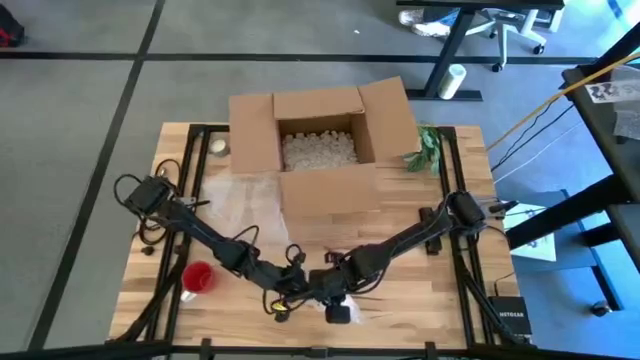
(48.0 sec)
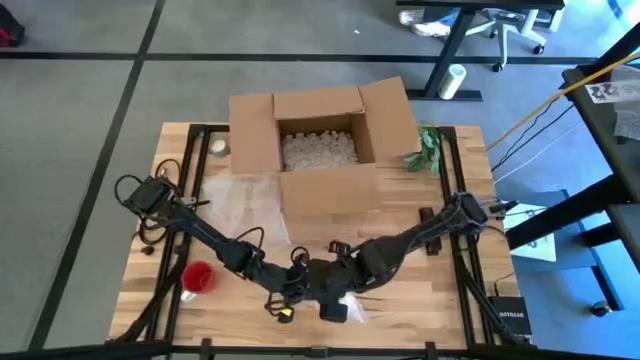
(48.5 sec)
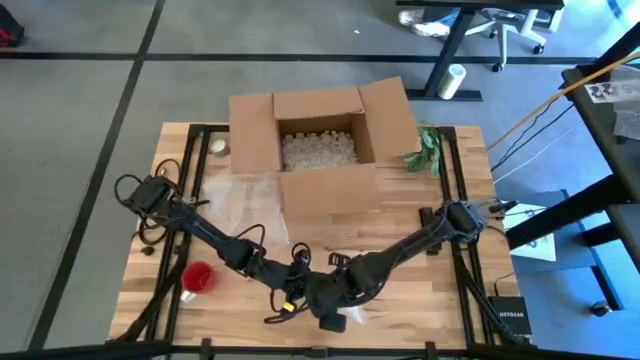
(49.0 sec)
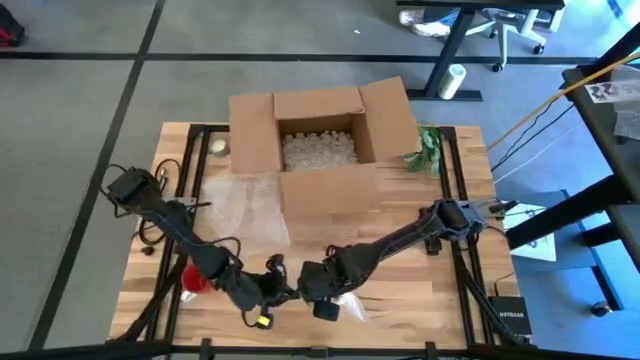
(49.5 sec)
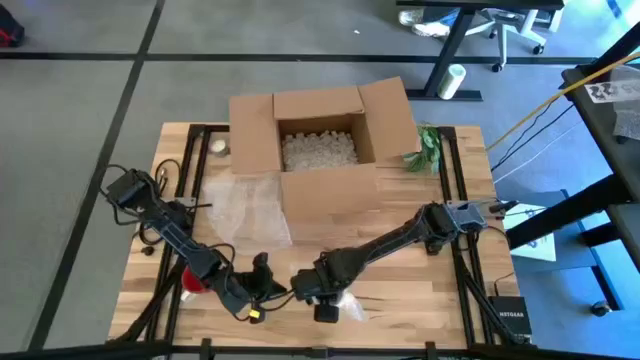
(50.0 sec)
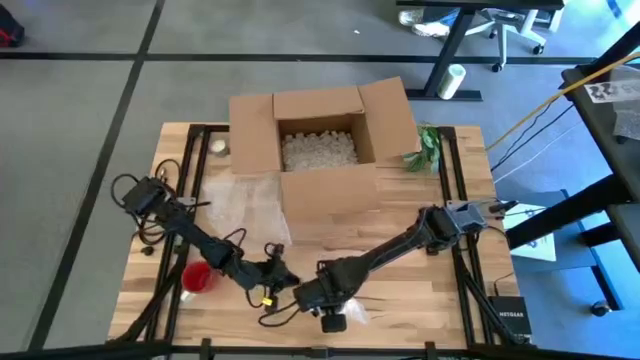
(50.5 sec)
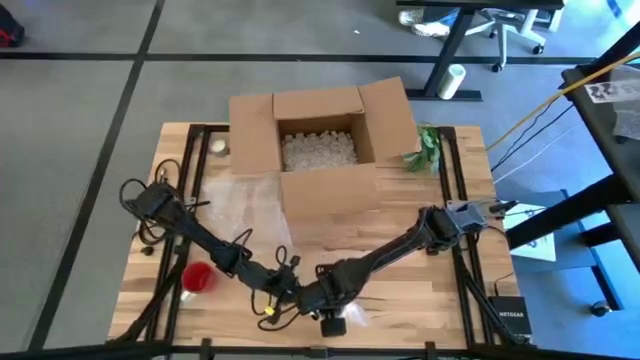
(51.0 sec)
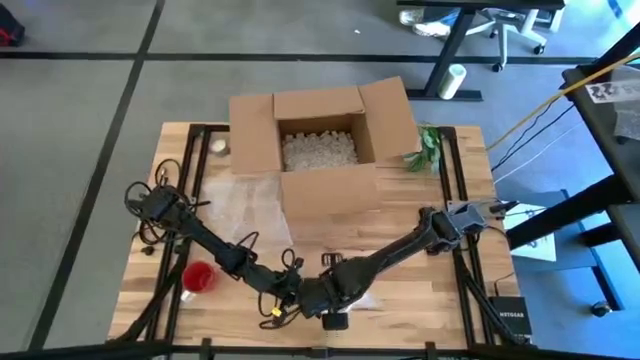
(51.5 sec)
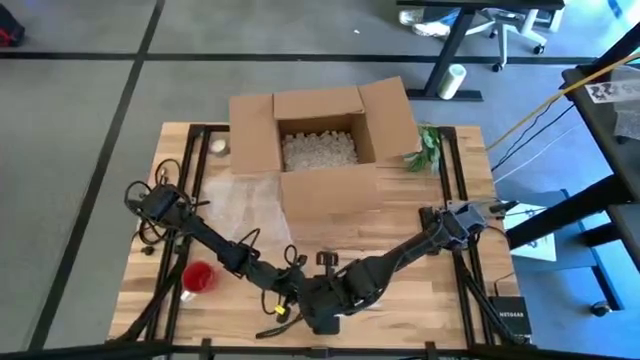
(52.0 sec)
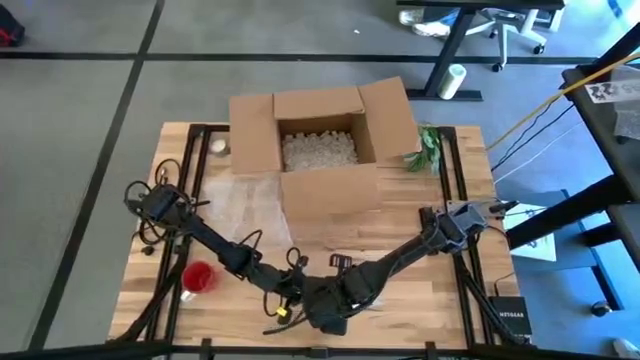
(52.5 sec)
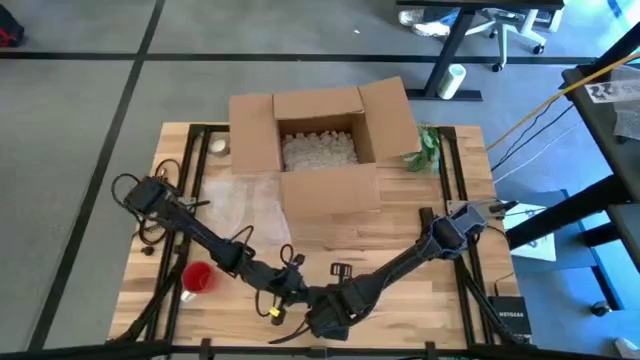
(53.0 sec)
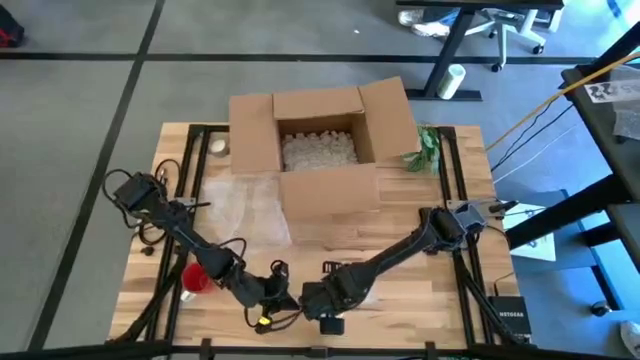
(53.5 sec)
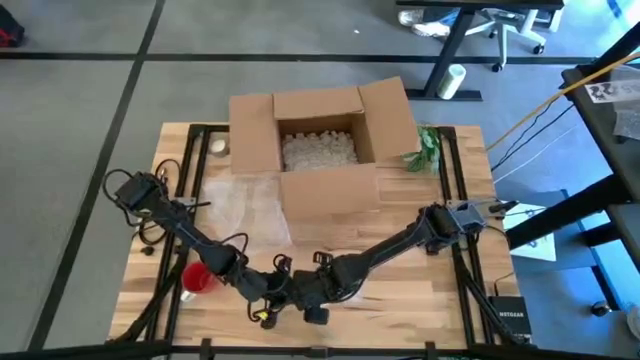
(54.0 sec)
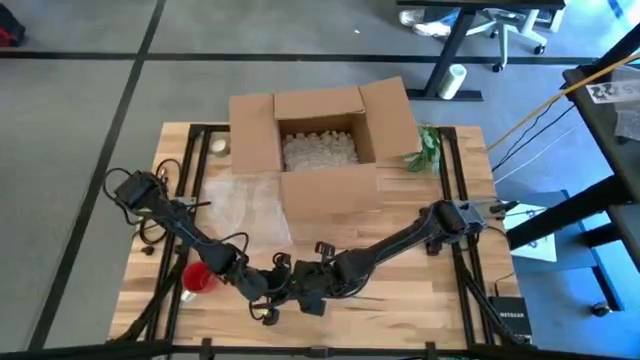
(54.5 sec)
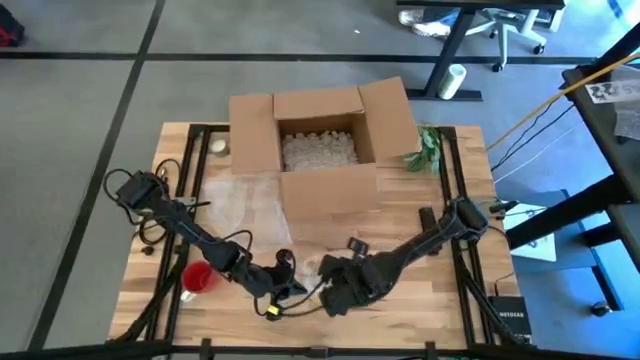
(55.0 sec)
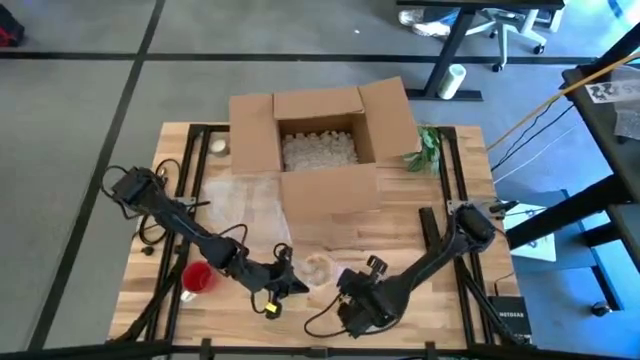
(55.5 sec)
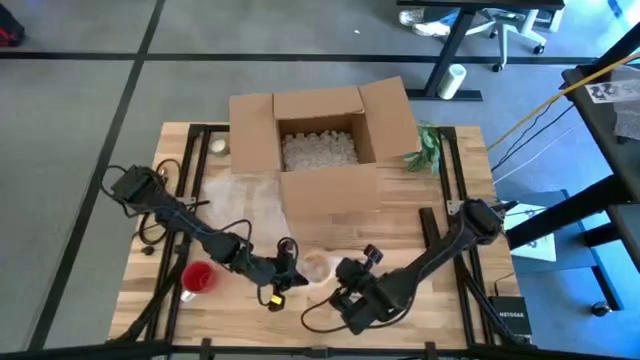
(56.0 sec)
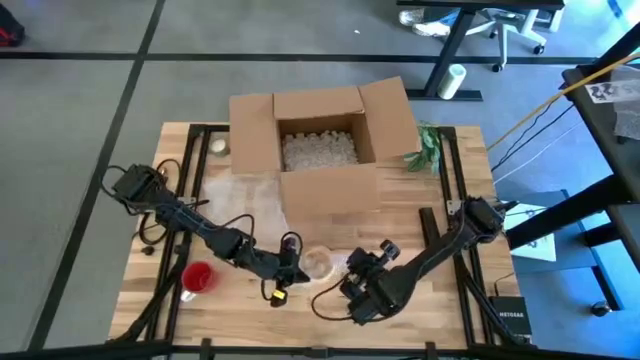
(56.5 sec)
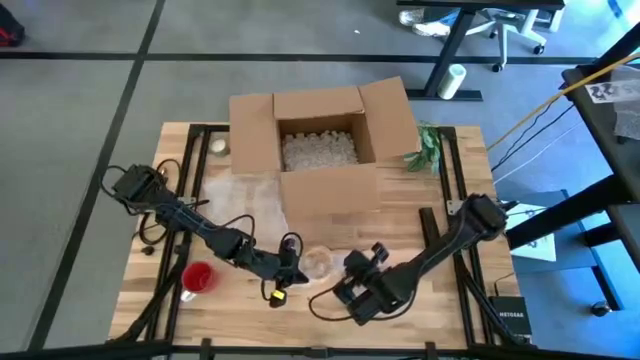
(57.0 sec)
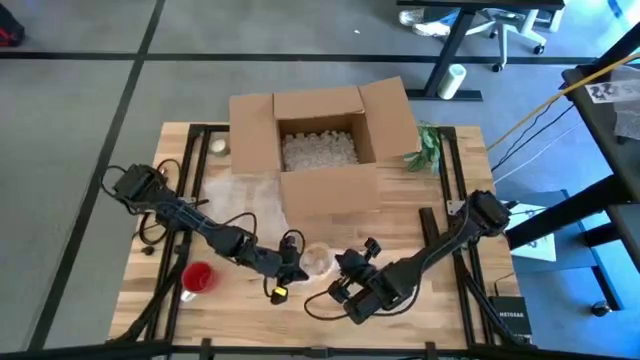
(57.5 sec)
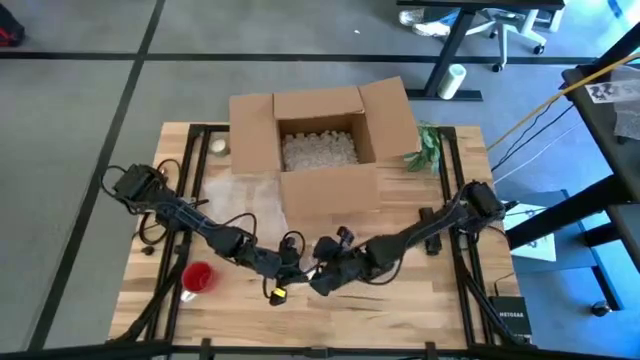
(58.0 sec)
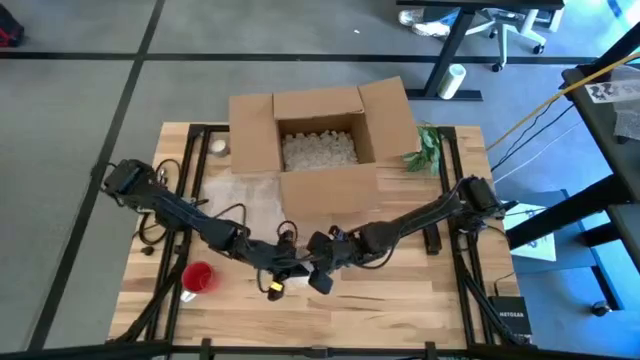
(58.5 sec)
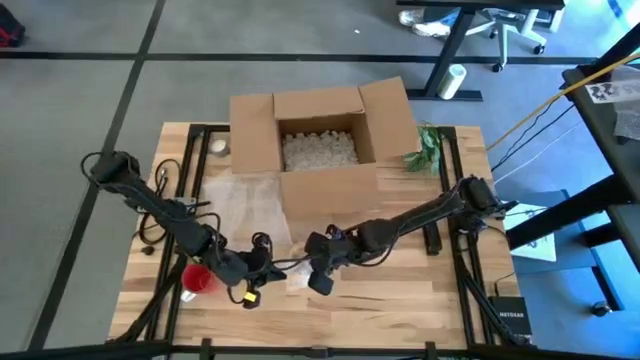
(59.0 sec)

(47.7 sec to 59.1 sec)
Task: wrap mug
Wrap the yellow mug with the right transparent bubble wrap

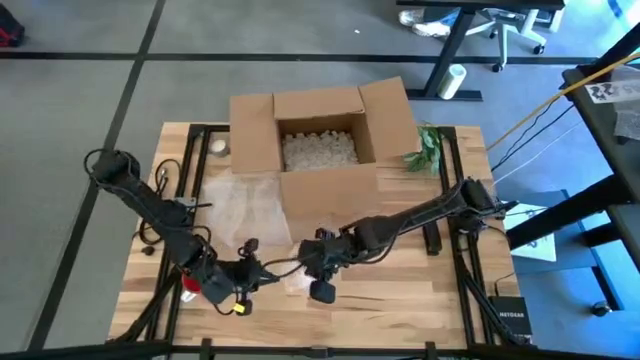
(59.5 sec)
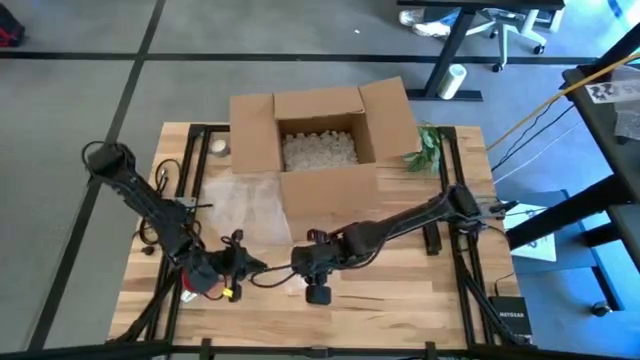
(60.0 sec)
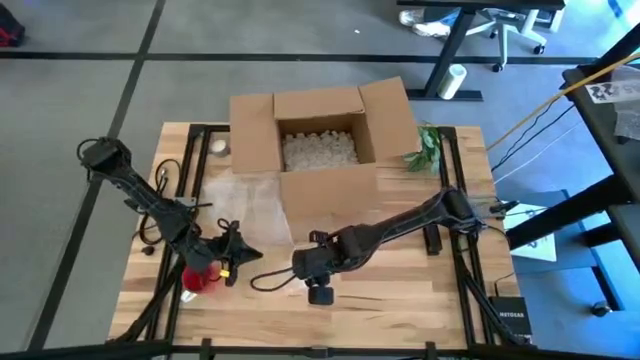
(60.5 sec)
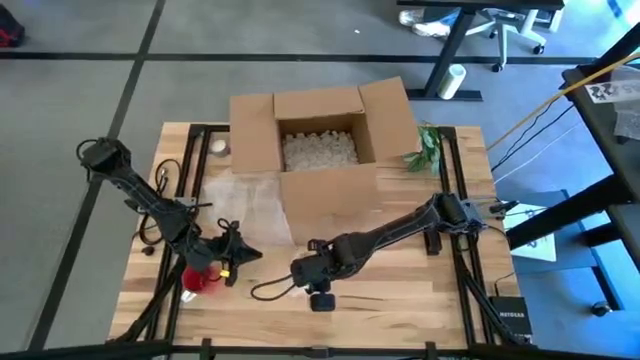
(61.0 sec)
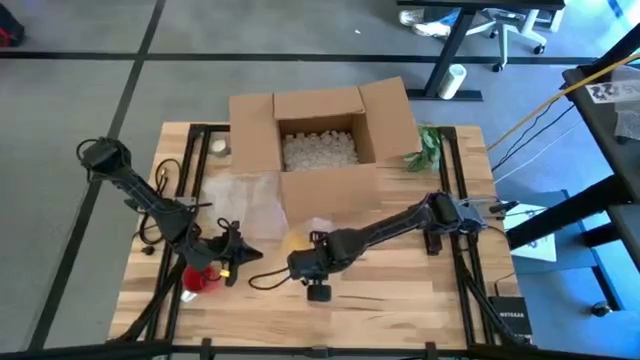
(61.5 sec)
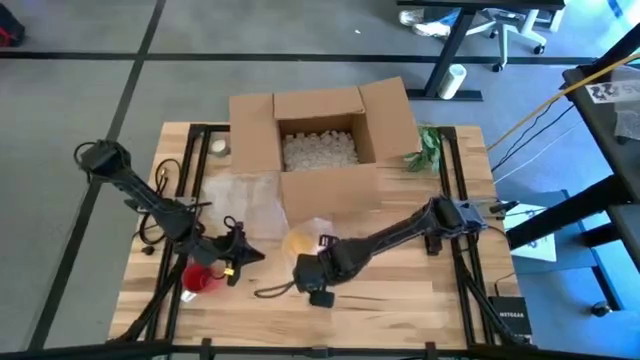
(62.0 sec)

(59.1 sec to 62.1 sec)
Put the wrapped yellow mug into the cardboard box

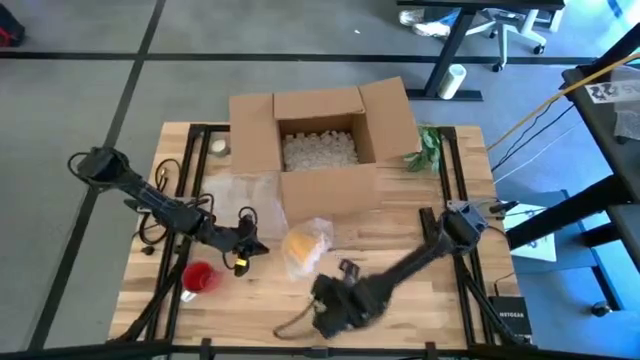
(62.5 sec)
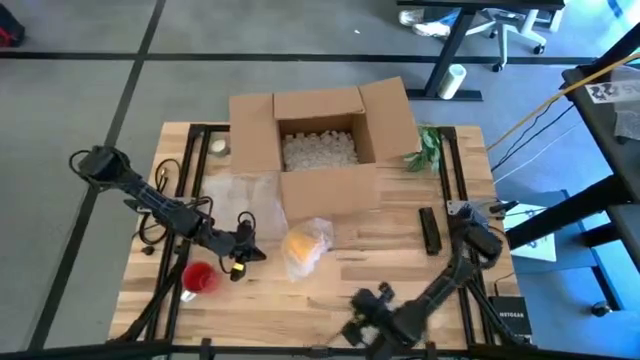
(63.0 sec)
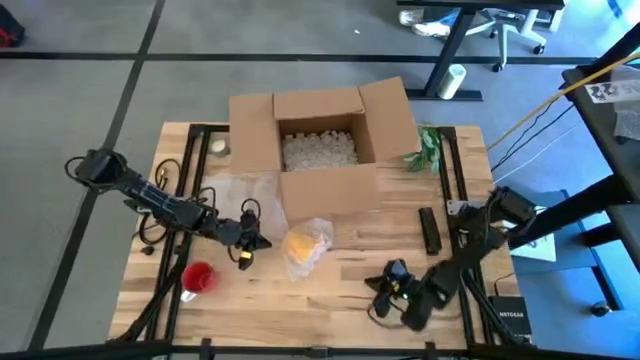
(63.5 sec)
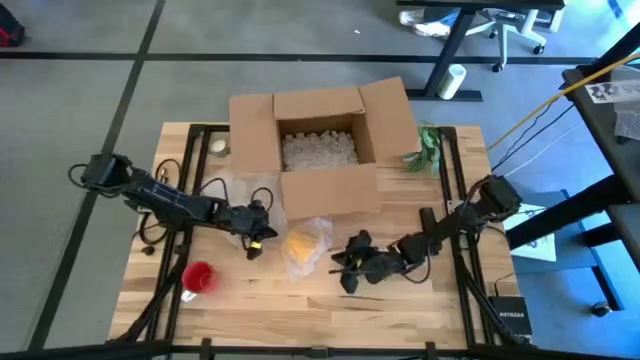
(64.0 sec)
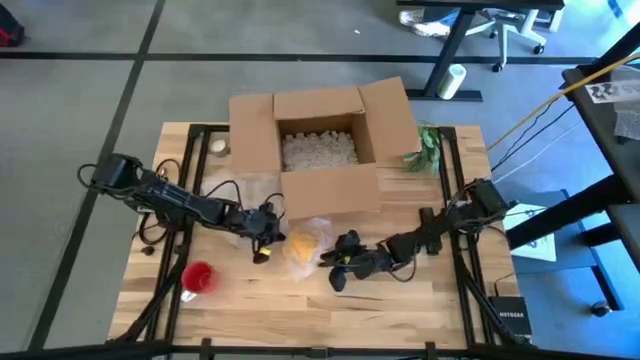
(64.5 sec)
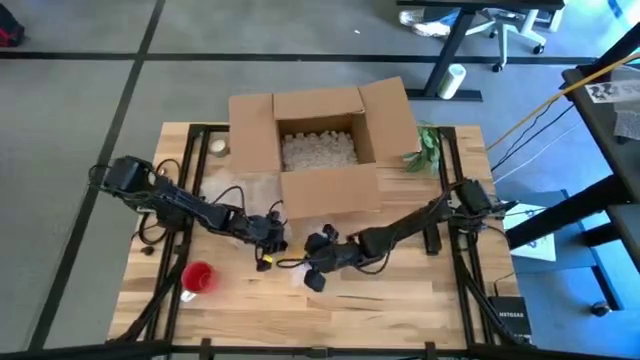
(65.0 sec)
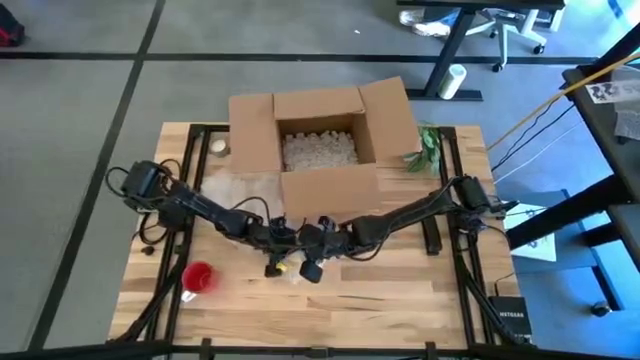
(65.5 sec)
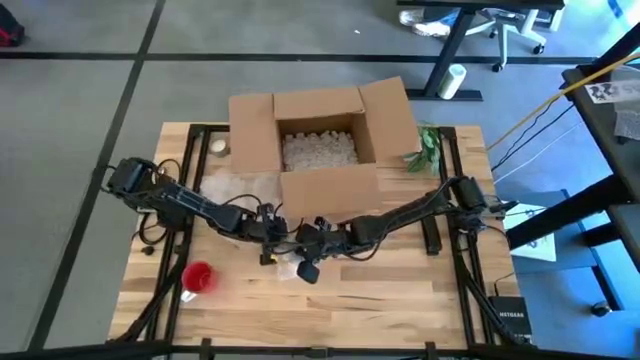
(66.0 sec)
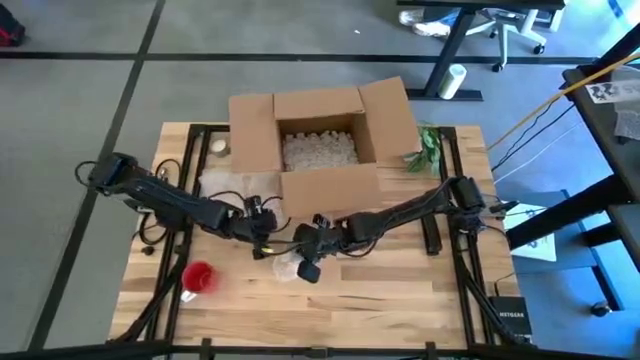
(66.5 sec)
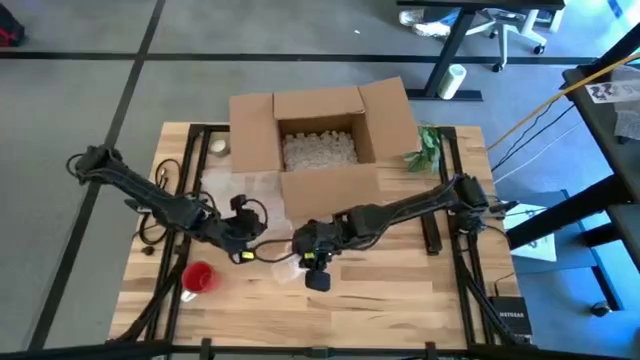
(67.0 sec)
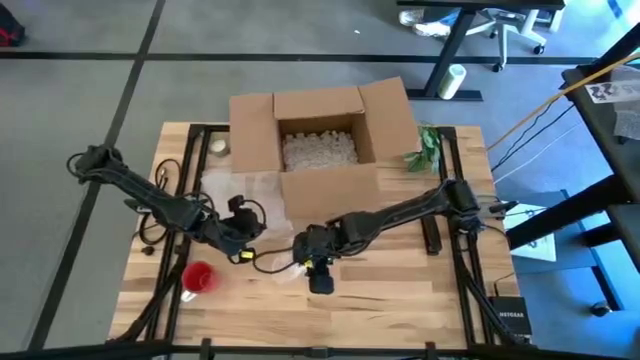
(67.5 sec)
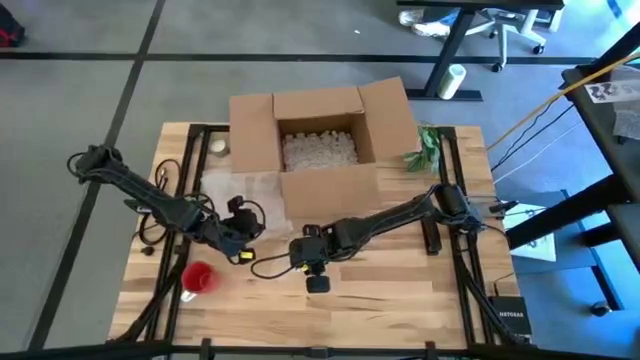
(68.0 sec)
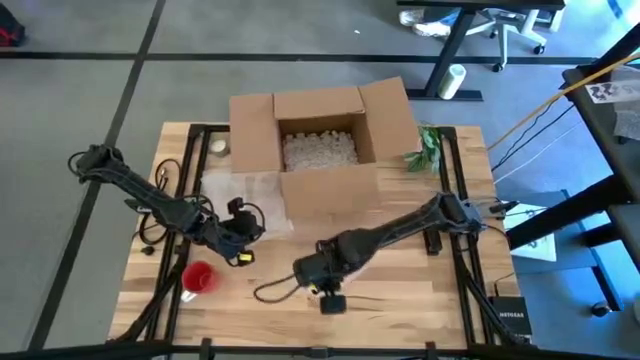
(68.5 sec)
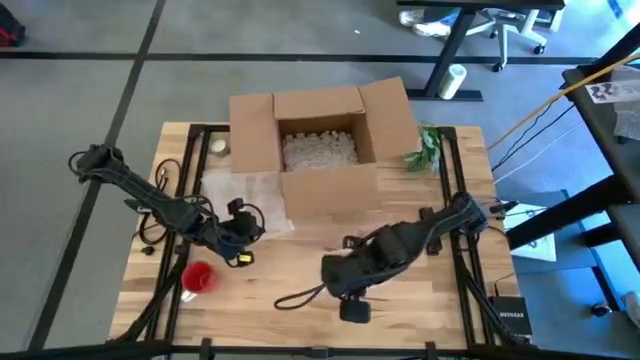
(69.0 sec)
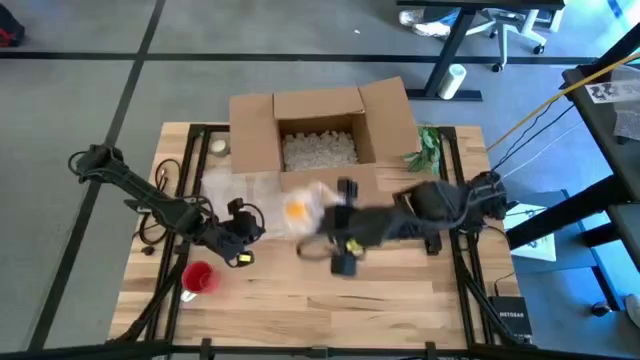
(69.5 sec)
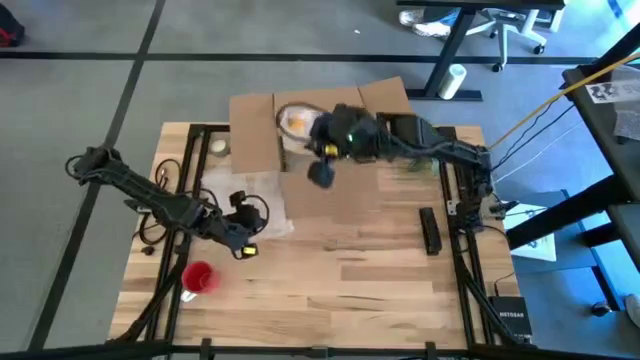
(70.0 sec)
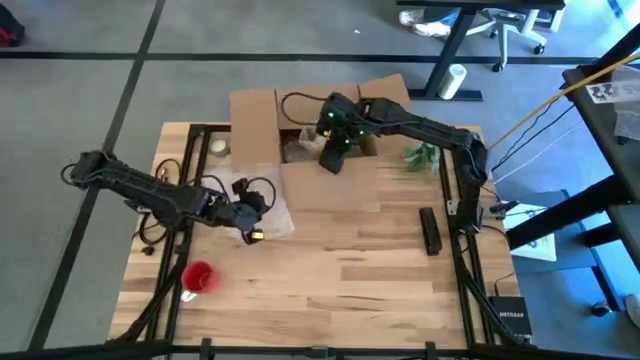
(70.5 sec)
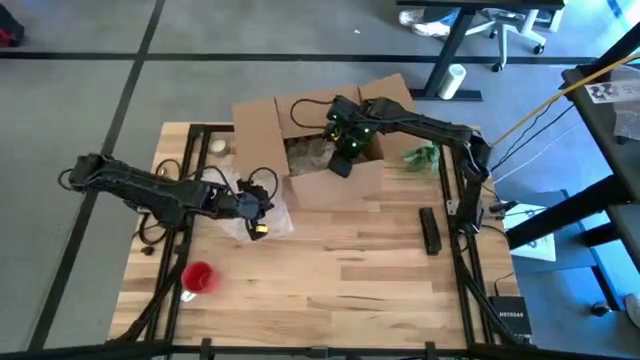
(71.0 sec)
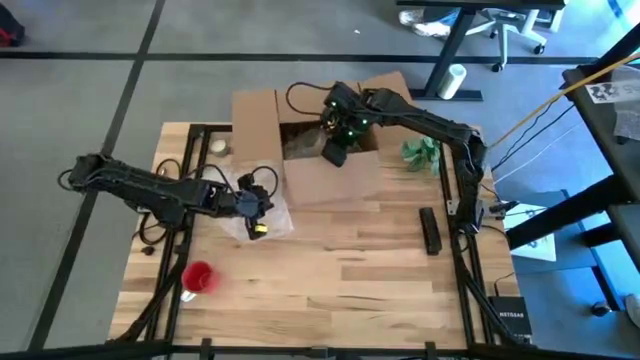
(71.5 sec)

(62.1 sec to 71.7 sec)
Put the wrapped yellow mug into the cardboard box
